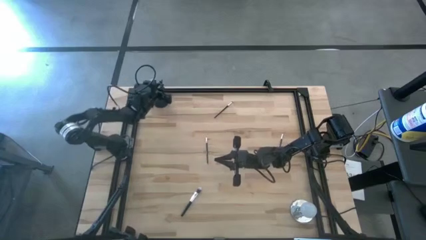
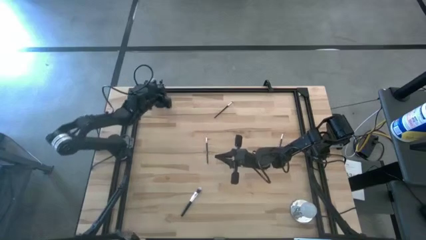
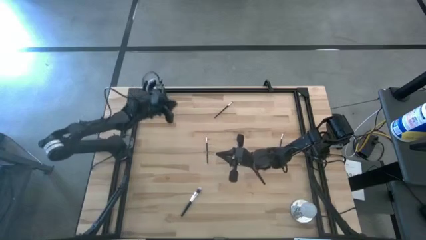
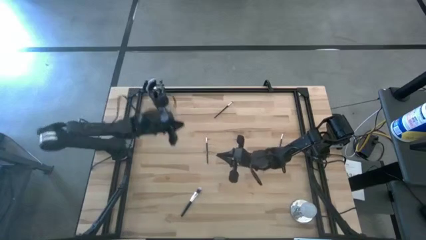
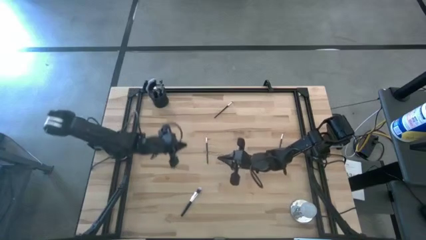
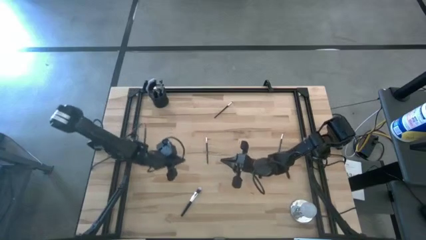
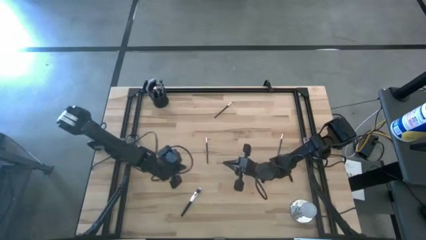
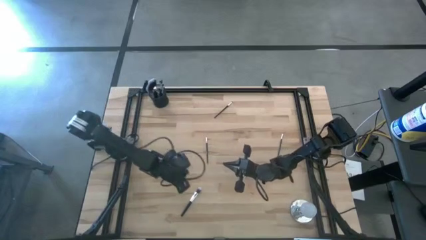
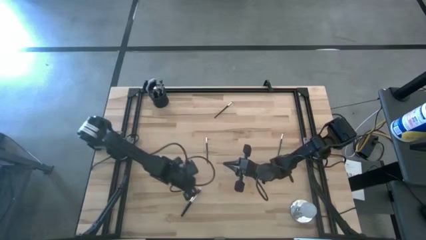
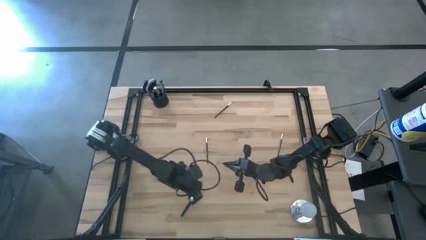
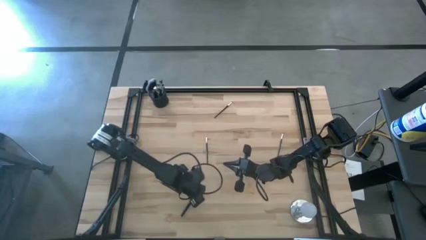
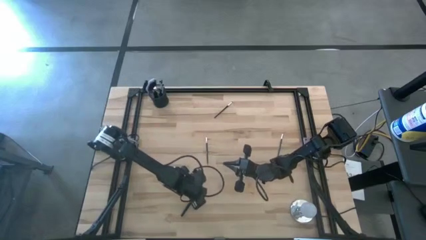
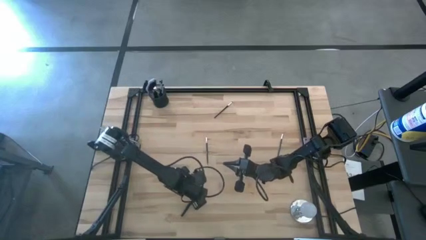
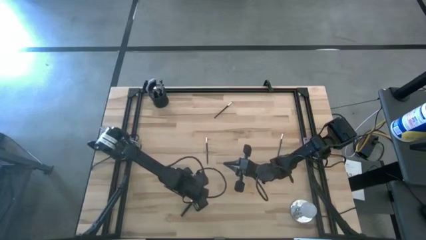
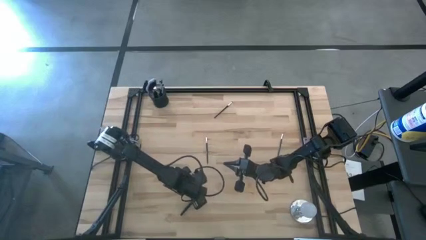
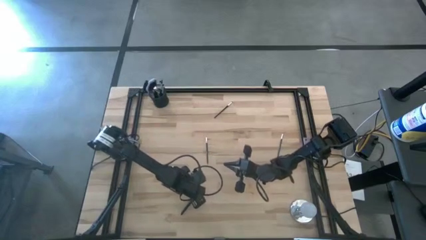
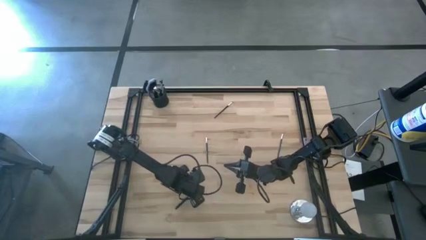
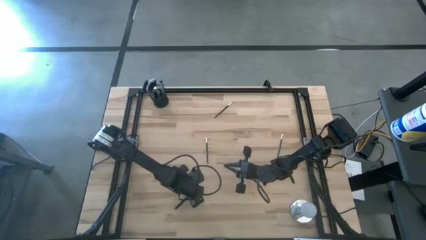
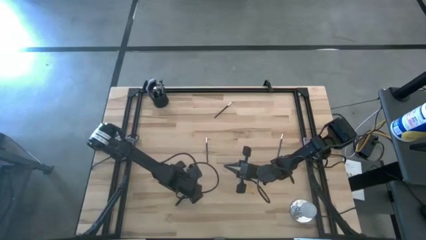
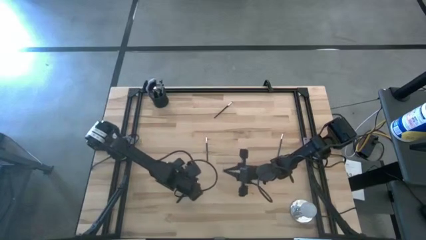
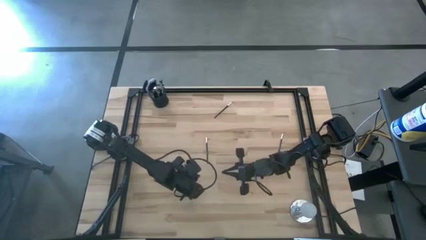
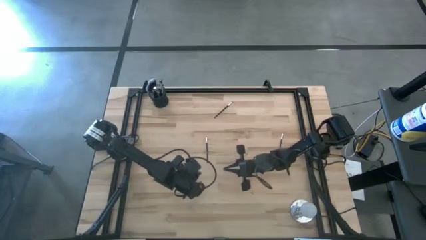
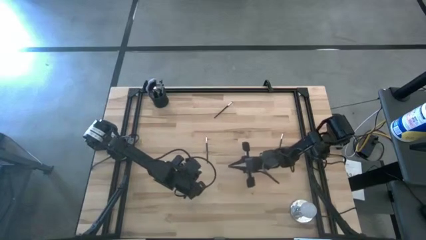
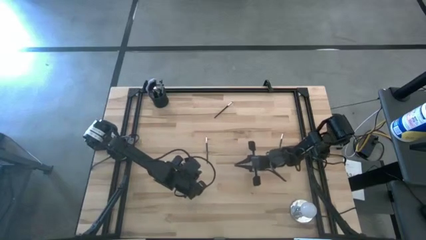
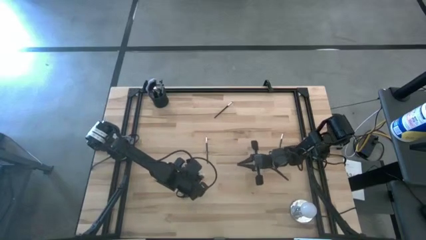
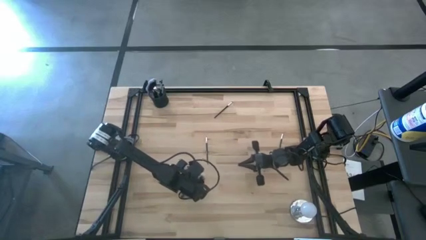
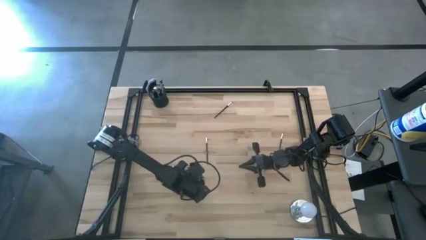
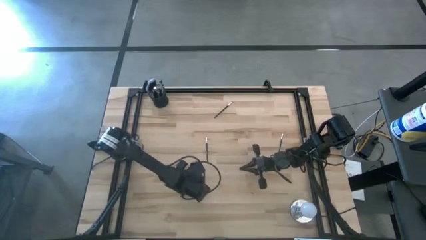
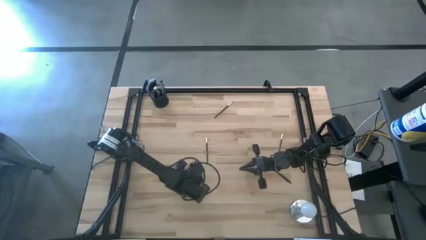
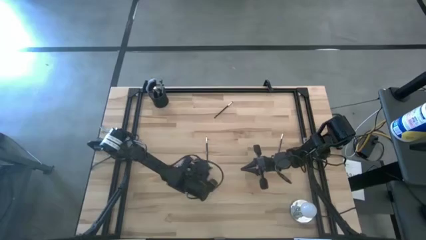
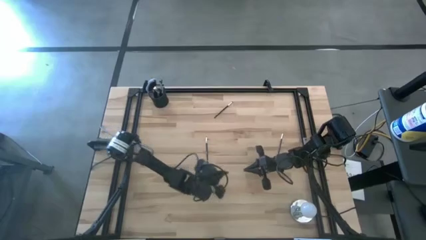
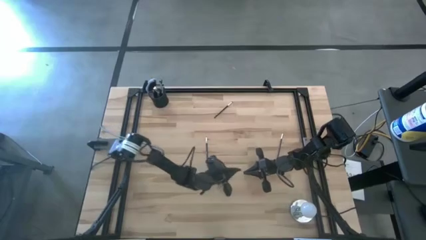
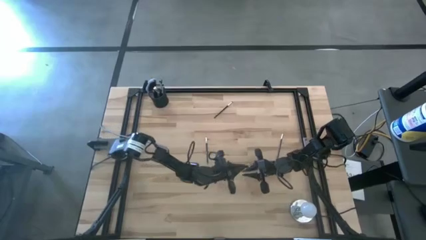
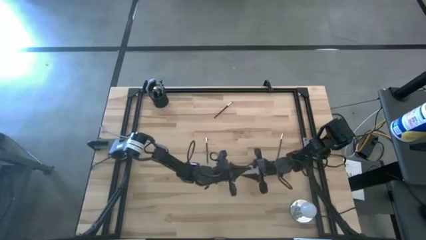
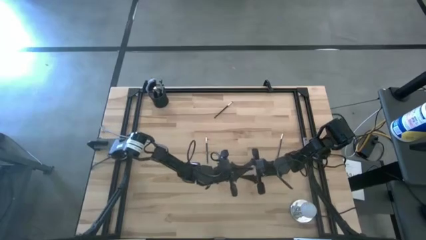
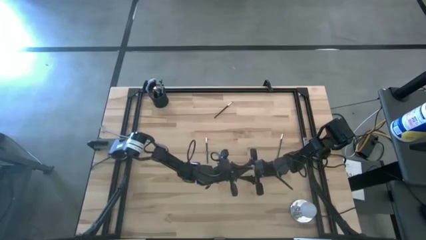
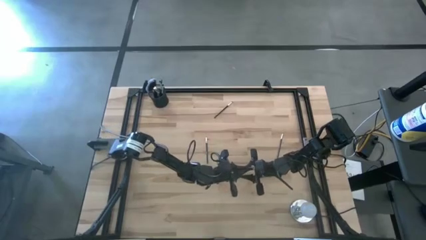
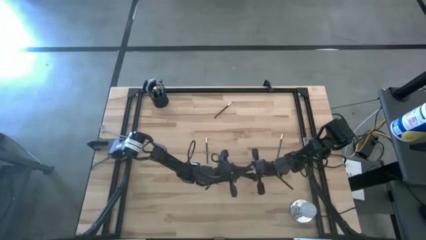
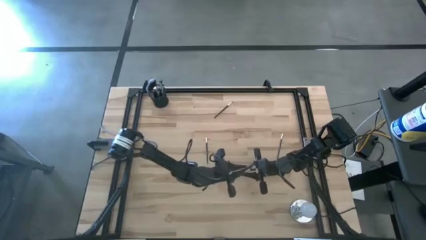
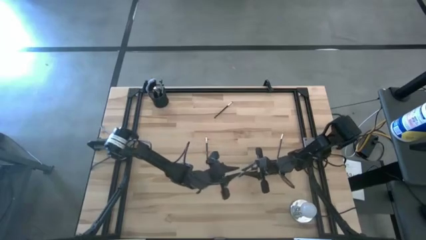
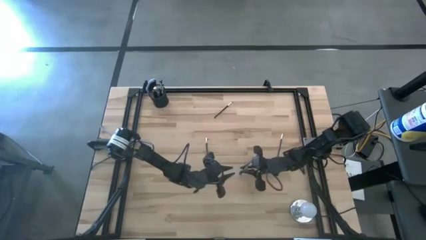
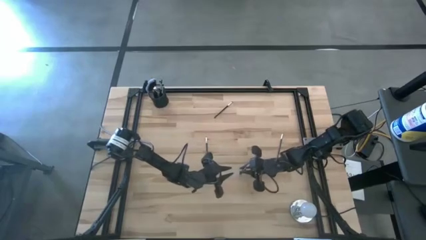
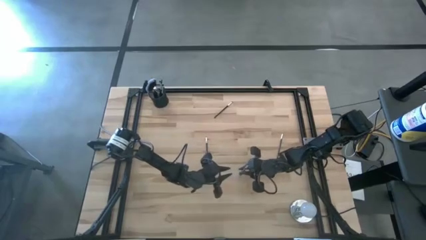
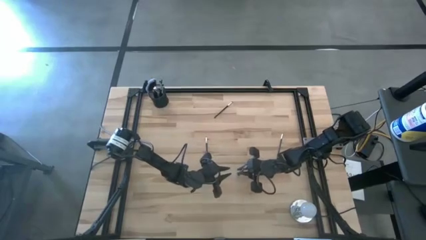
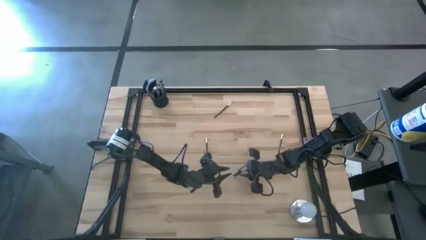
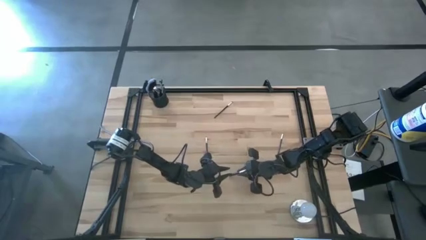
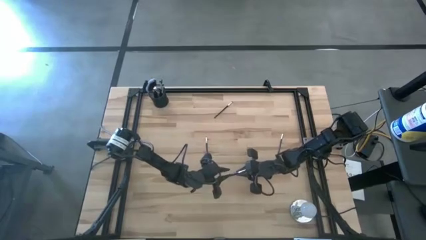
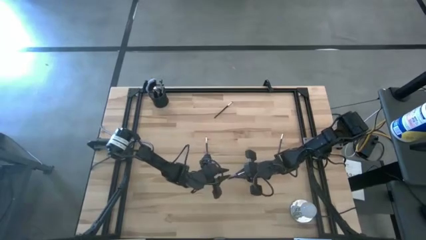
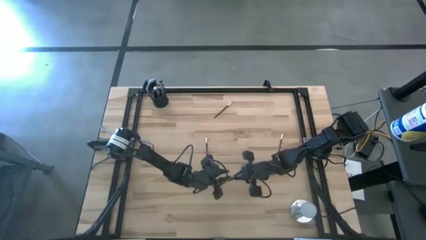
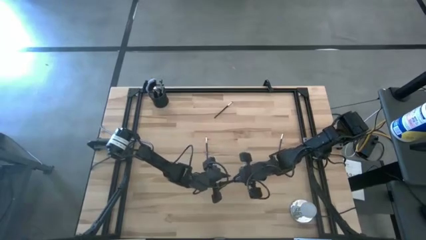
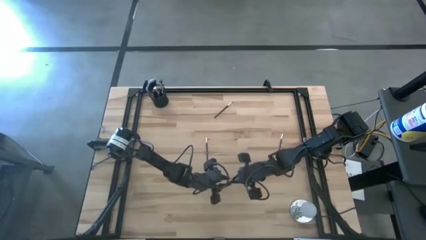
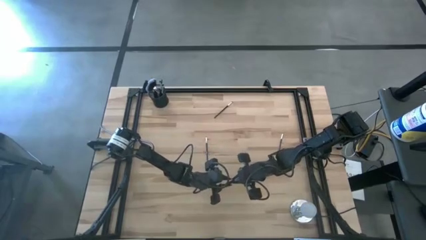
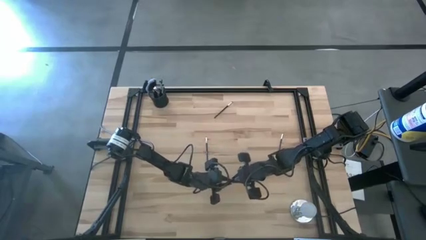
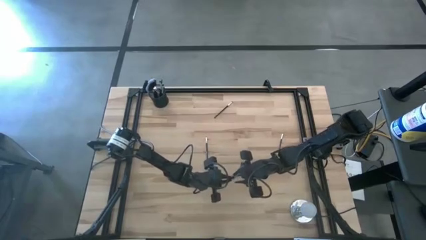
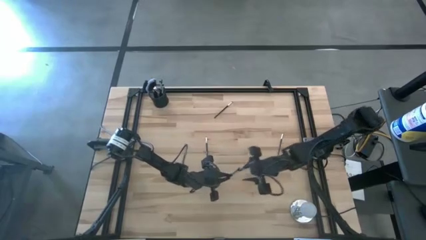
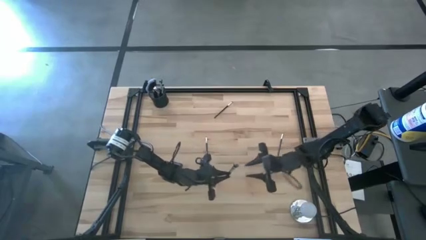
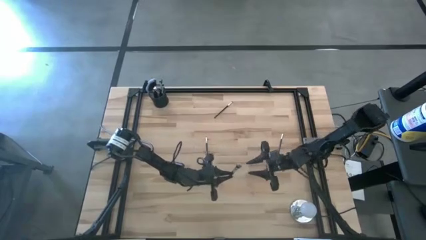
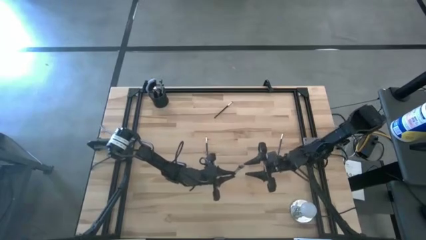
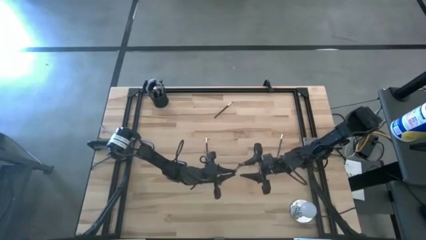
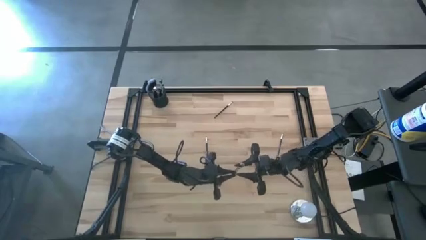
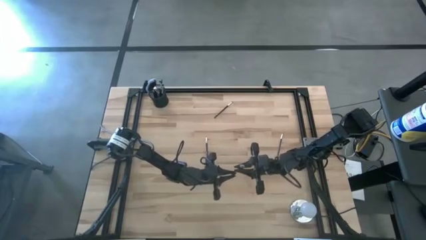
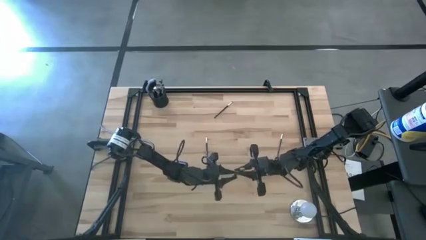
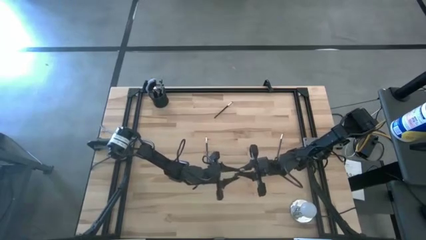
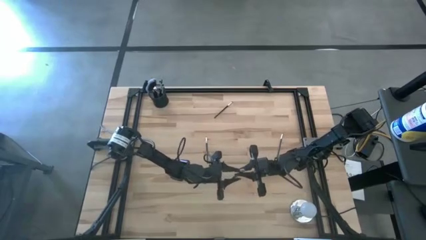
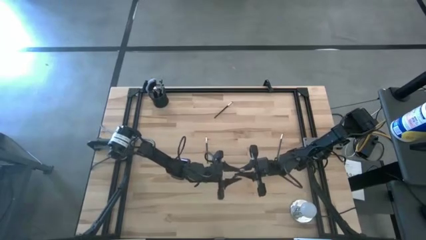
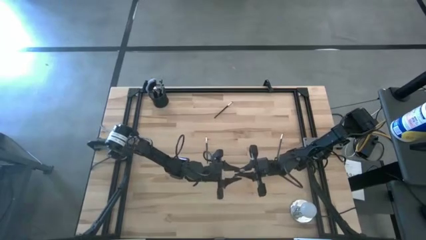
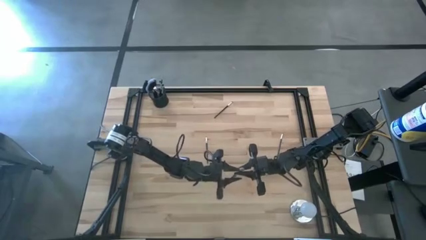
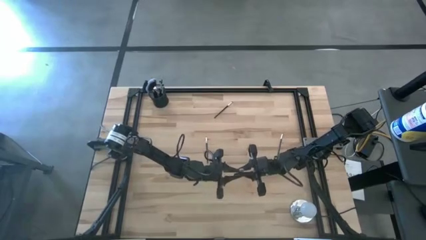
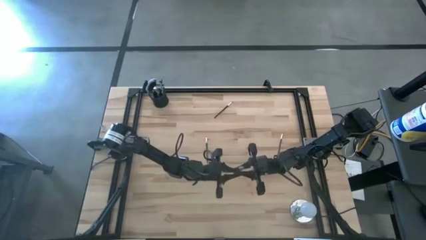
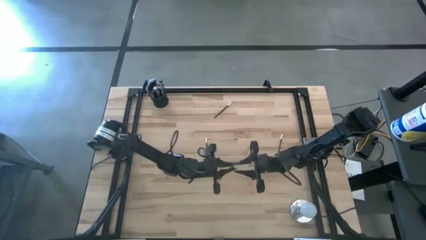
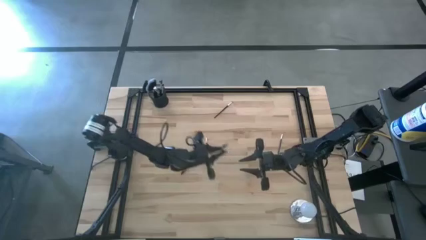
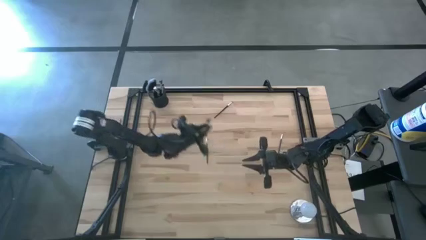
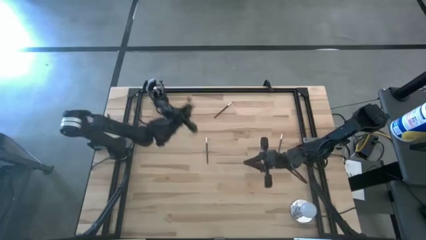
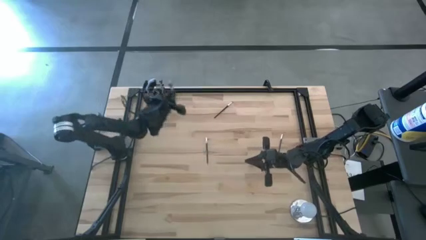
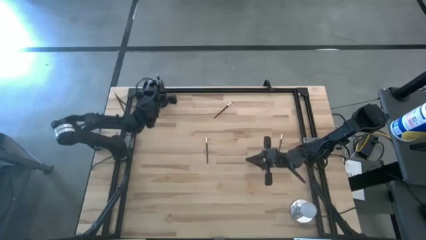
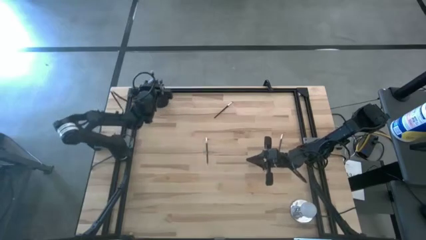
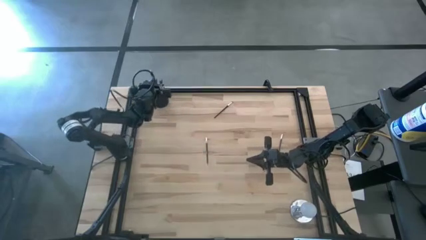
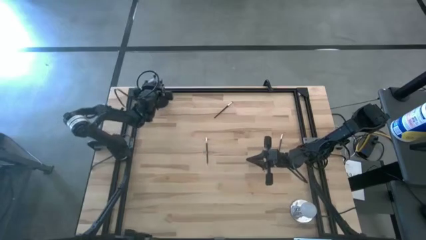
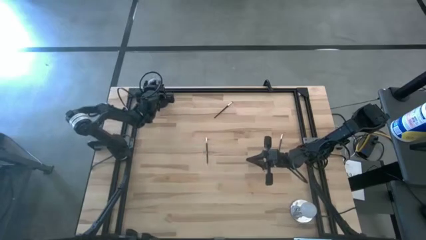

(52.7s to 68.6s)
Task: Put items in baskets/containers
Put the powder brush into the holder
